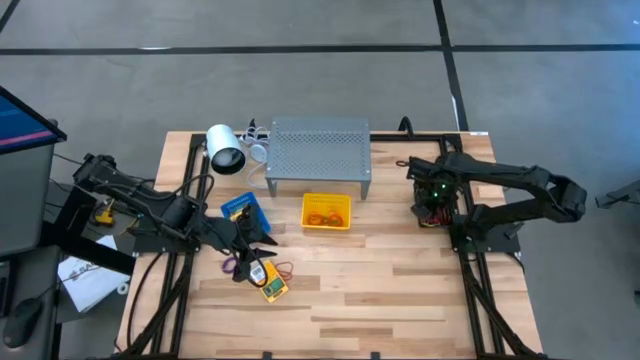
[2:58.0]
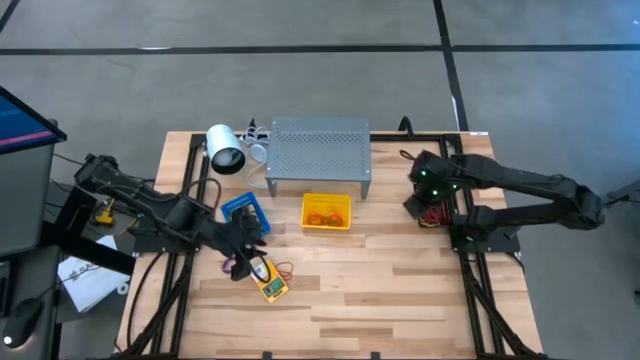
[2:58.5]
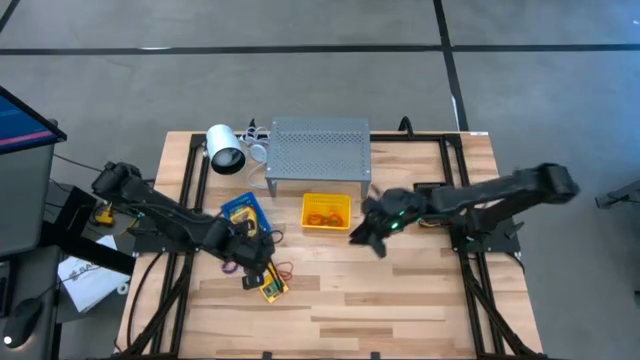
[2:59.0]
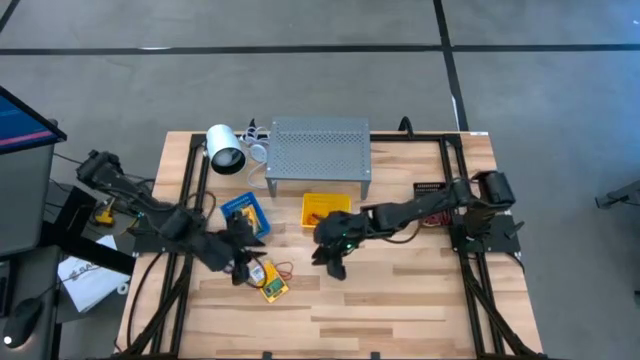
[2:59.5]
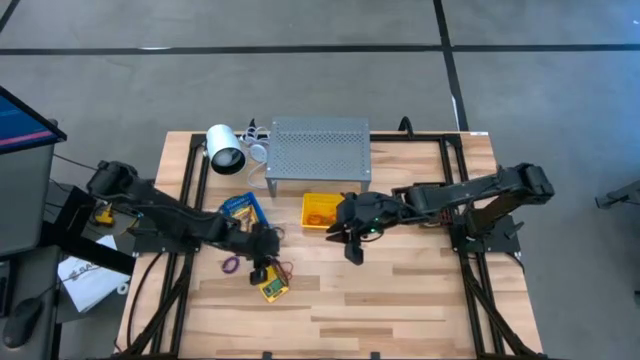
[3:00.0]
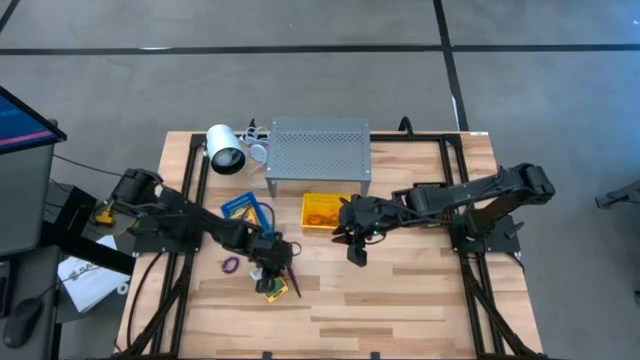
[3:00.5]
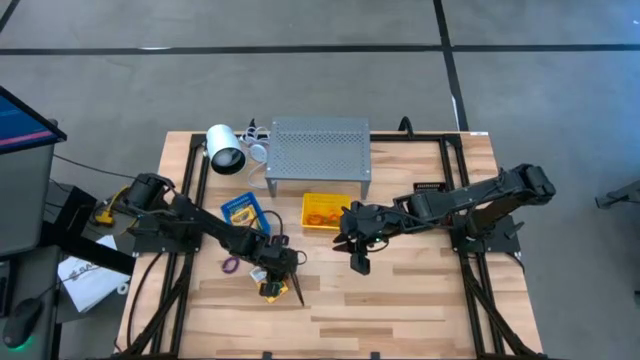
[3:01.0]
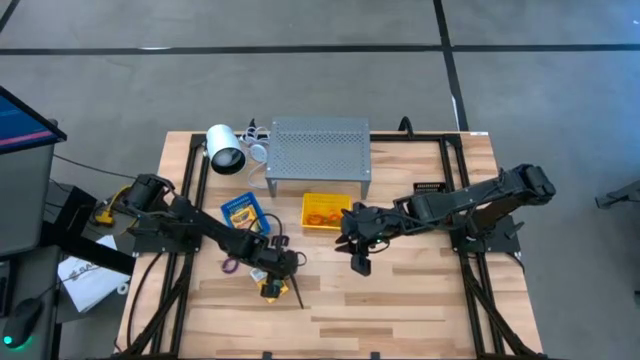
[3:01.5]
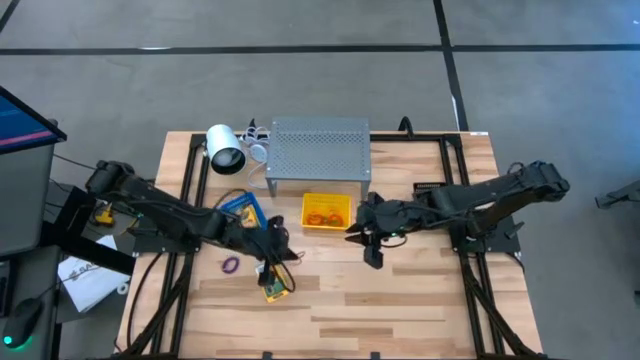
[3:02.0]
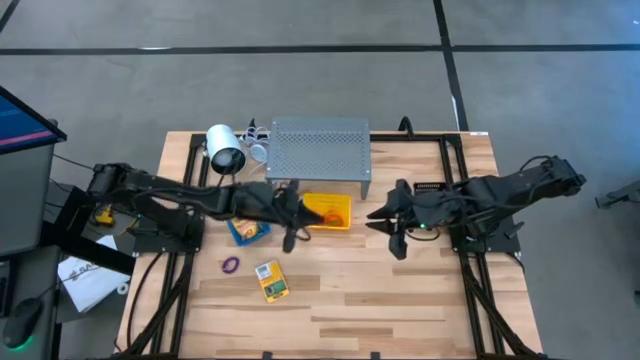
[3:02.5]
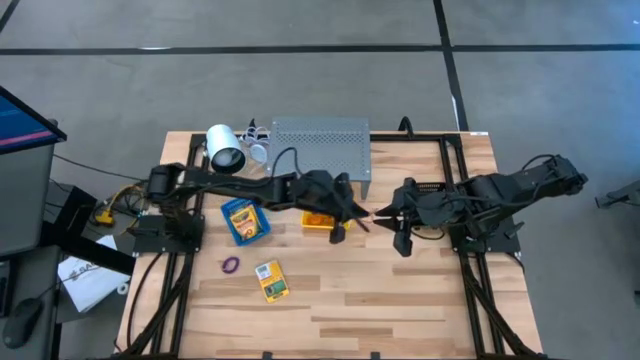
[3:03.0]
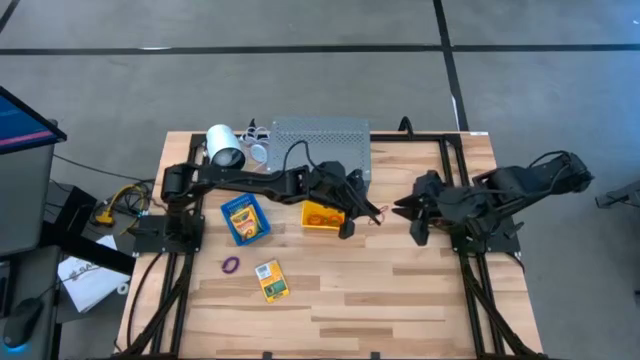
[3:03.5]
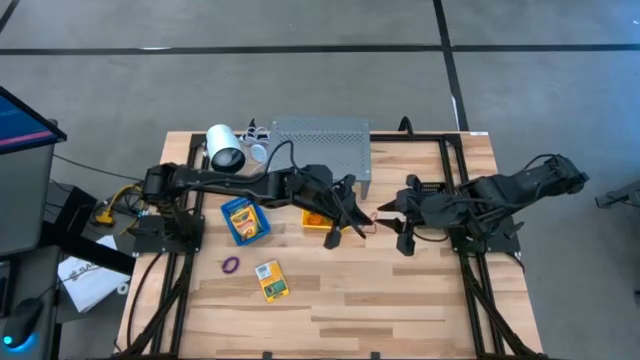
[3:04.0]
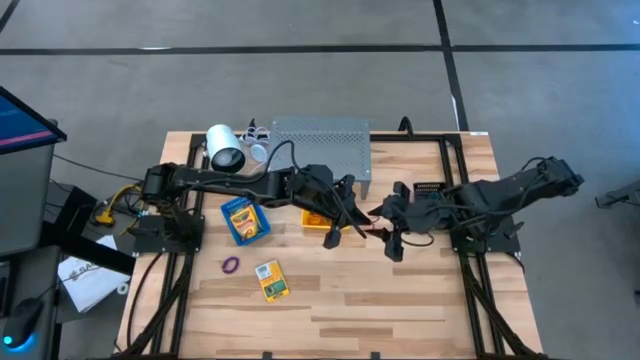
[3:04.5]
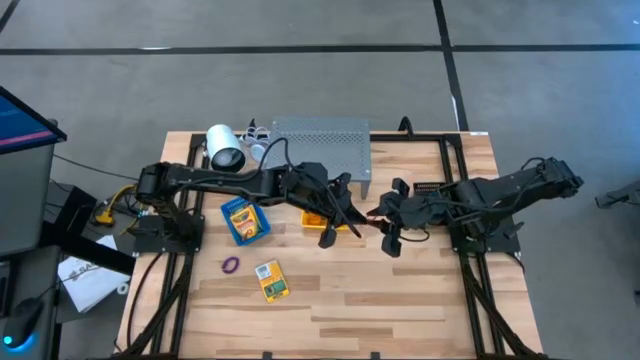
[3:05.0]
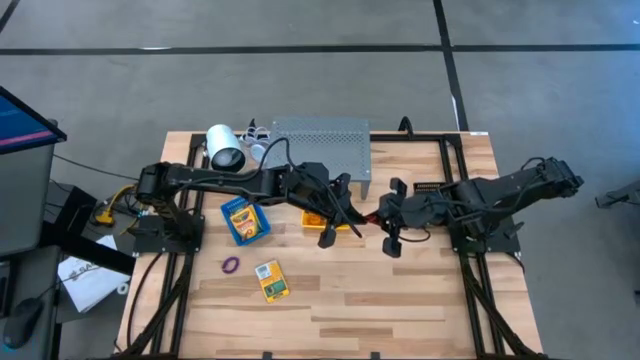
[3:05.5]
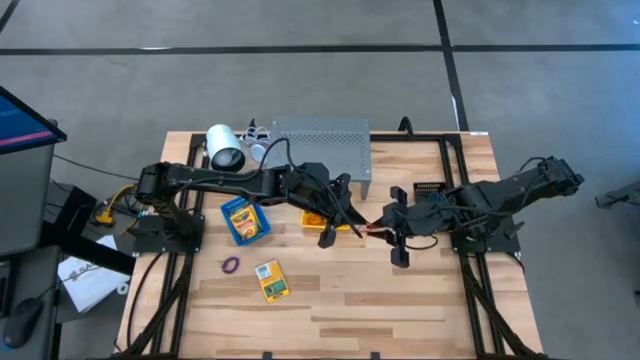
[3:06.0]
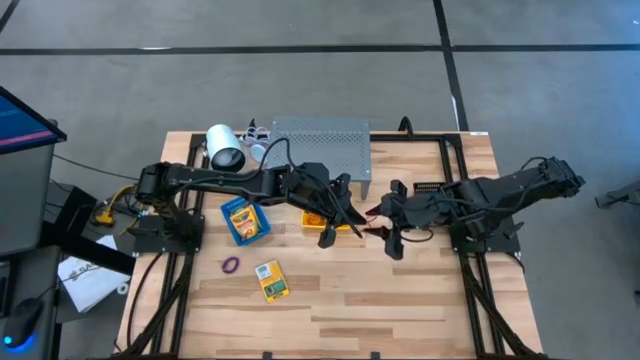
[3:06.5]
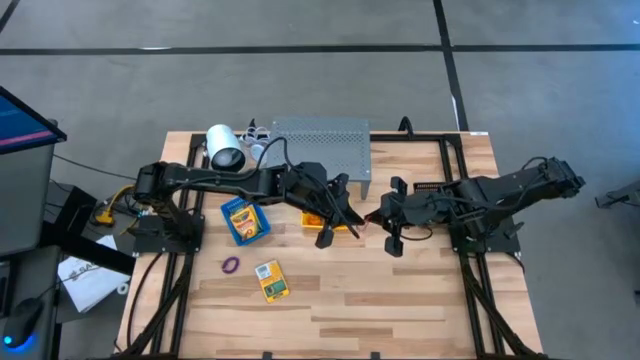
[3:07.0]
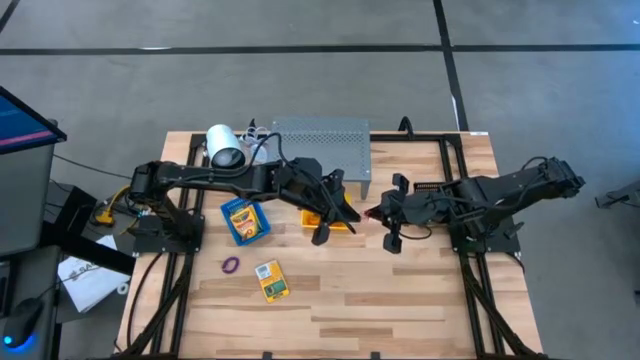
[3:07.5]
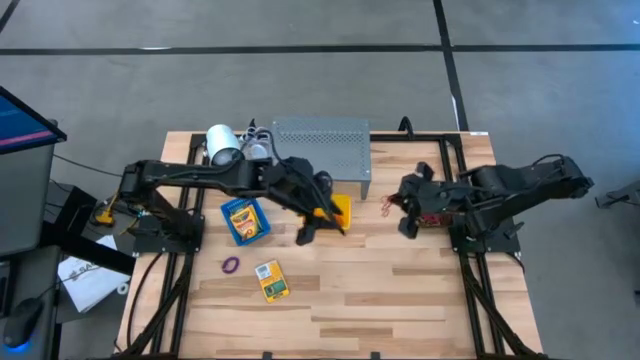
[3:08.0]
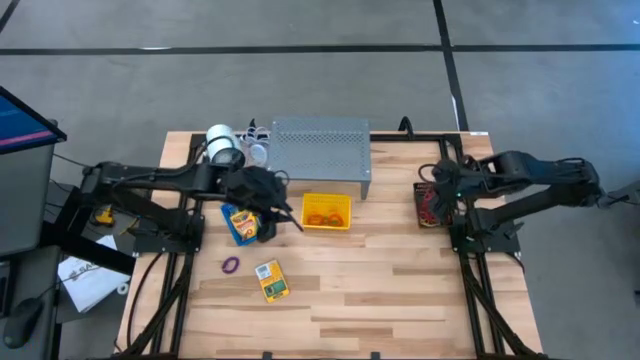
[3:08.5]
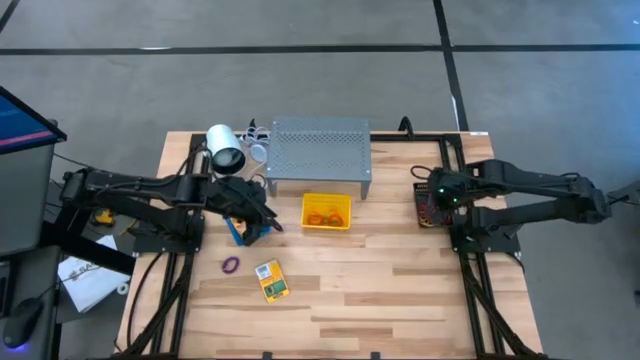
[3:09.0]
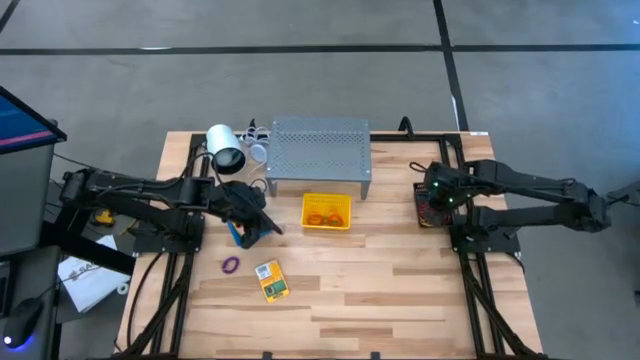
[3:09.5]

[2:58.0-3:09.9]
Task: Pick & Place Office Desk Supplies
Put the red rubber band into the black bin

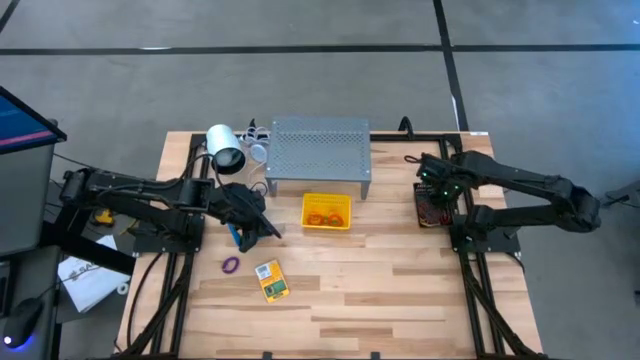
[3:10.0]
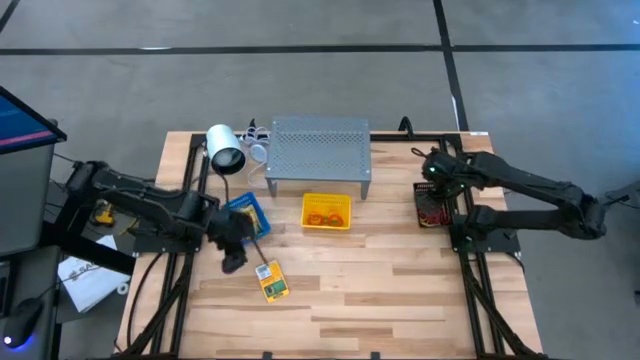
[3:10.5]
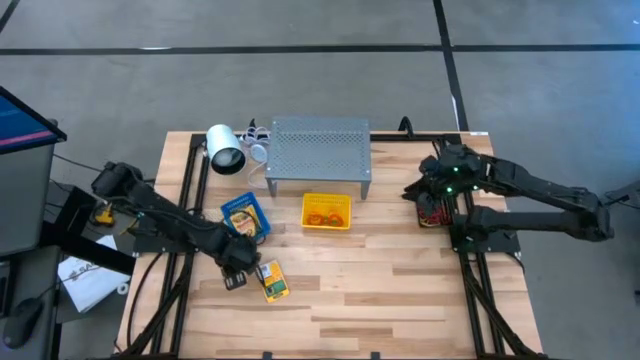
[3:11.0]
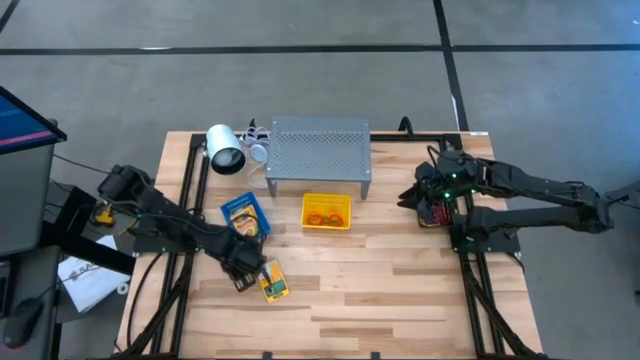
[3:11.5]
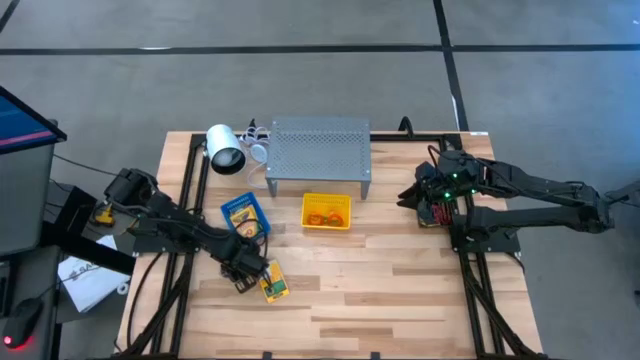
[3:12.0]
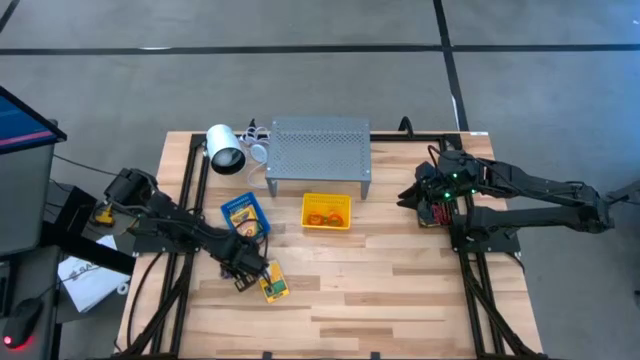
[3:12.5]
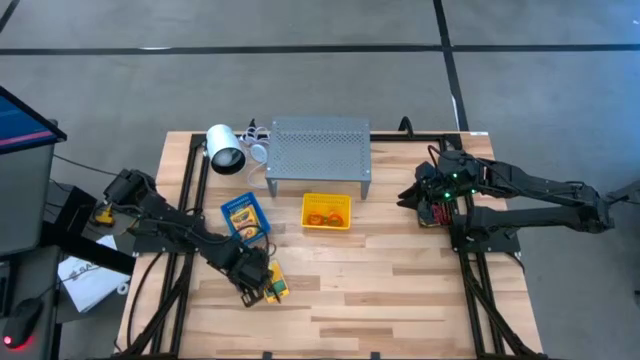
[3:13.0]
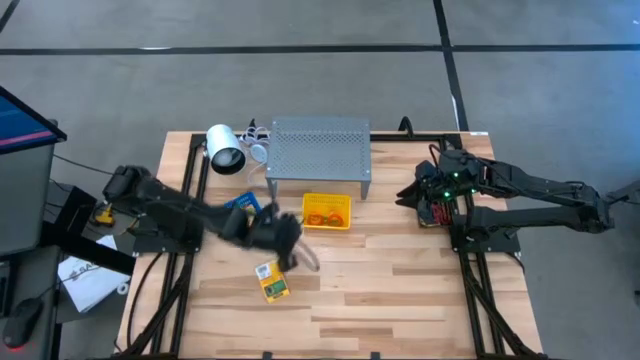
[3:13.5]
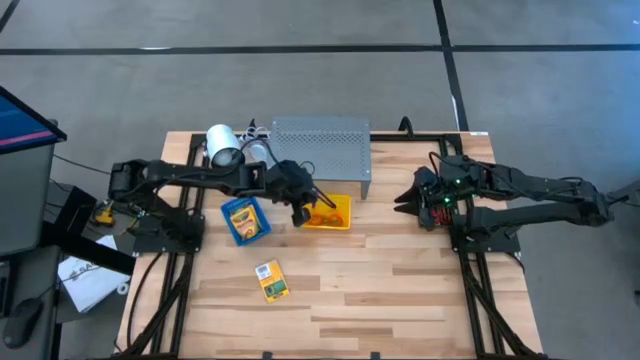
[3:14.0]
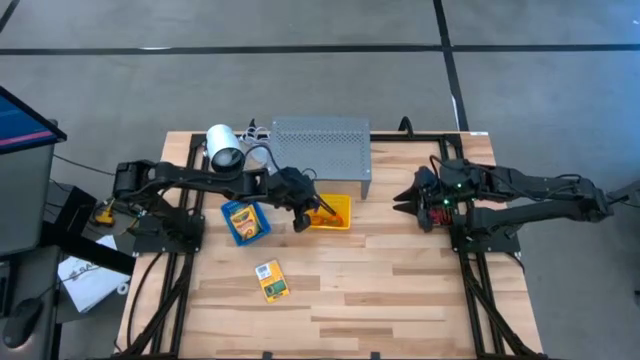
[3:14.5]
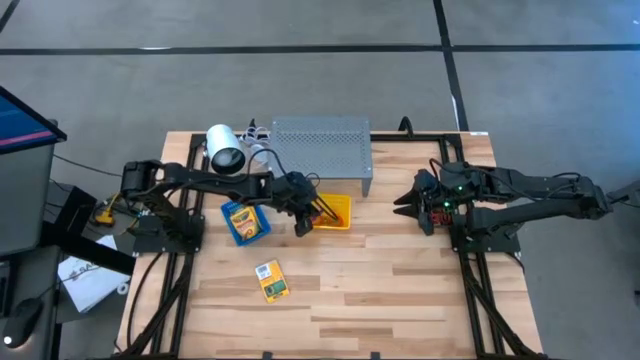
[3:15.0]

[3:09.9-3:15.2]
Put the violet spring keychain into the yellow bin

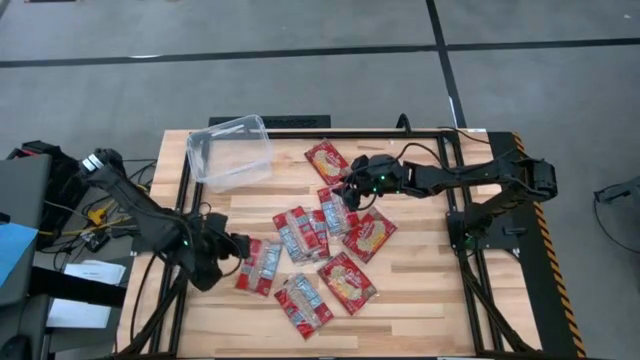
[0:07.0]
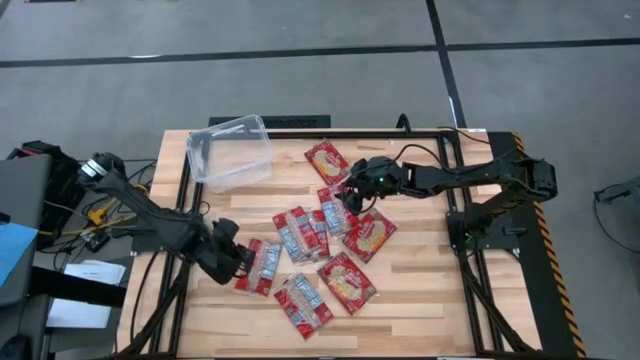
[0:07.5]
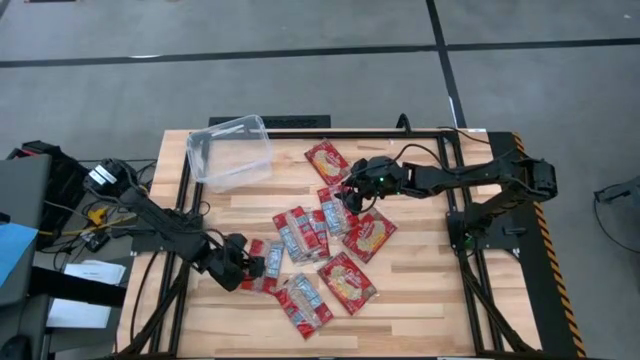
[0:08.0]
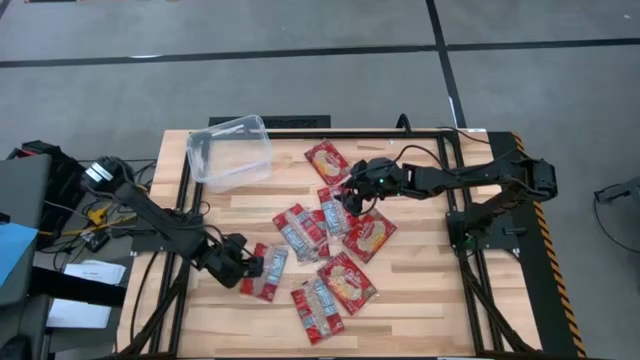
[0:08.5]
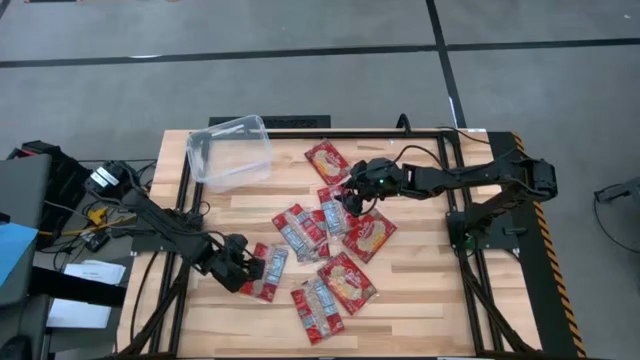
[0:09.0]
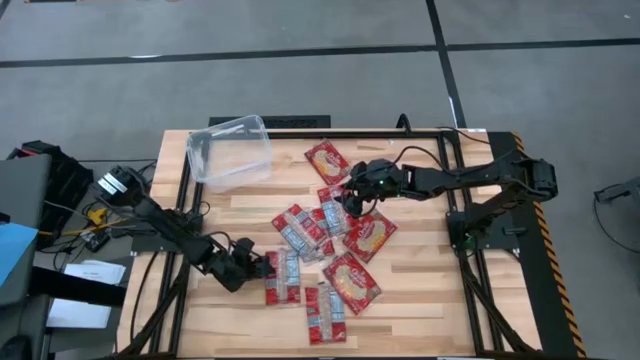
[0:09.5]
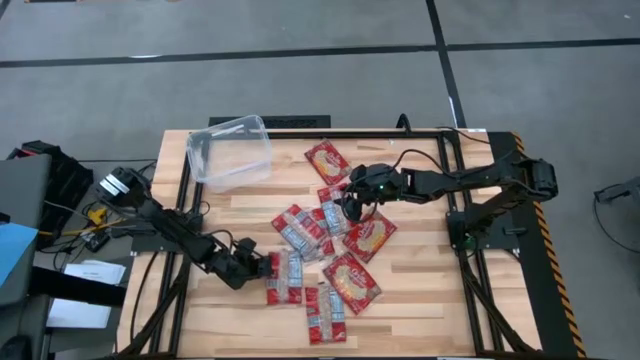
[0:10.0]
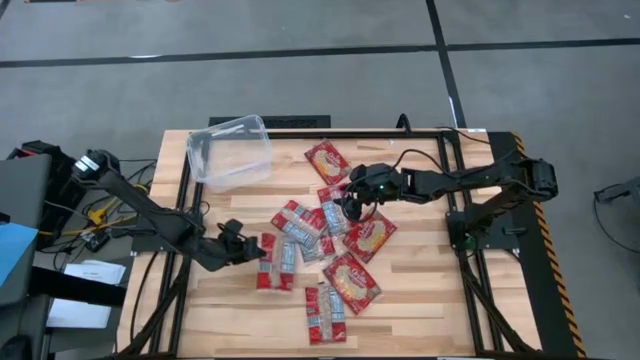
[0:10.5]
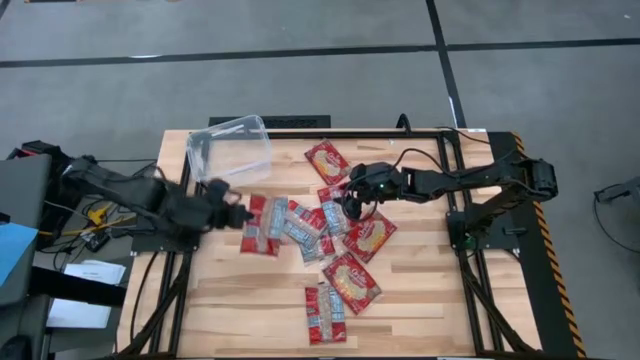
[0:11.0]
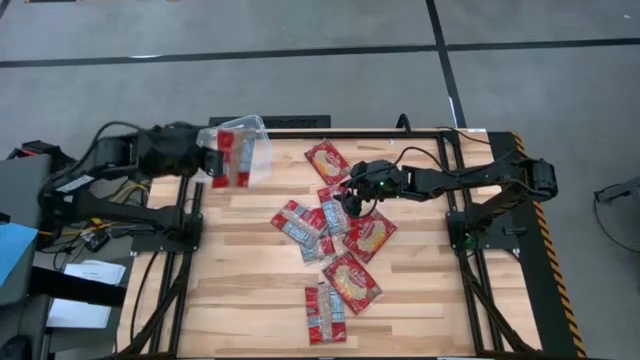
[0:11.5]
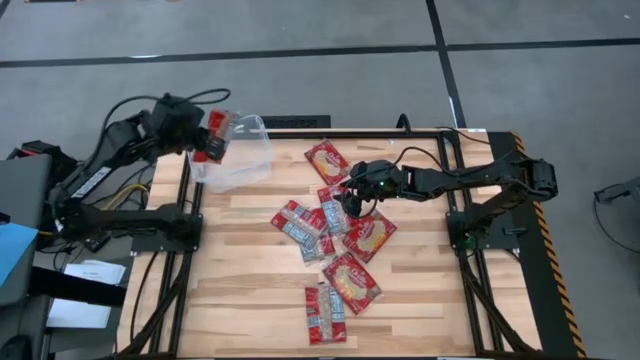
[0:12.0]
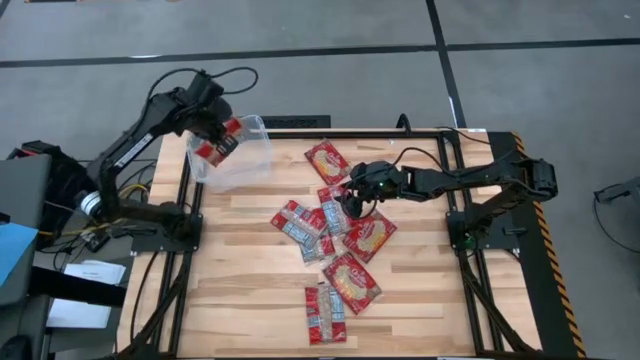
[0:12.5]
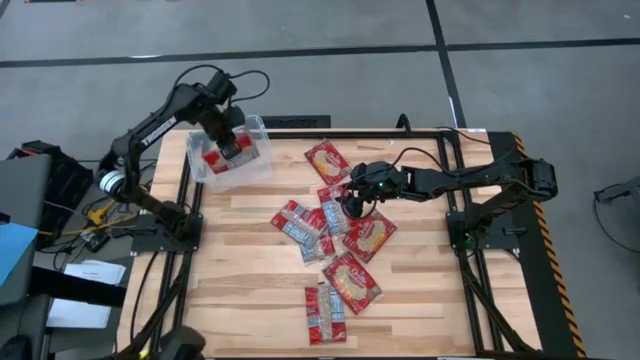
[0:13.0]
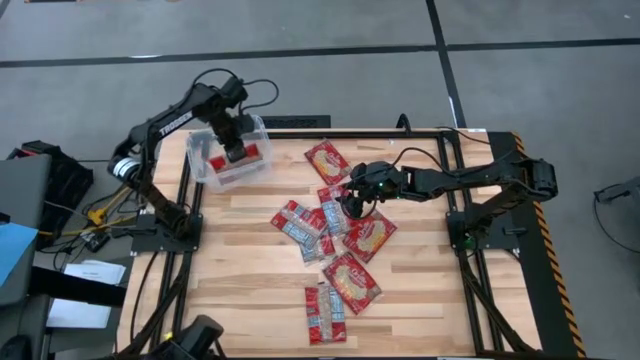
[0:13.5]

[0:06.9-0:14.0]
Task: Sort popcorn bags into baskets
Put the red popcorn bag into the transparent bin
